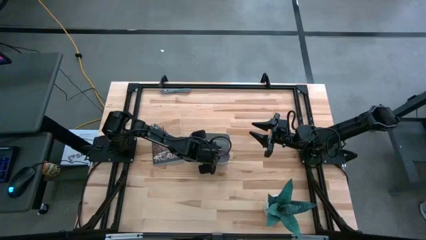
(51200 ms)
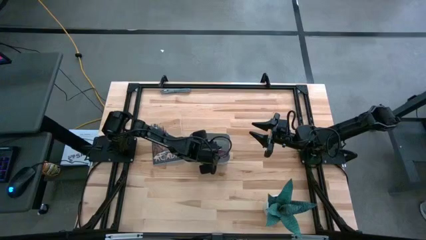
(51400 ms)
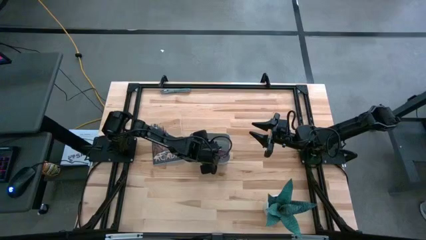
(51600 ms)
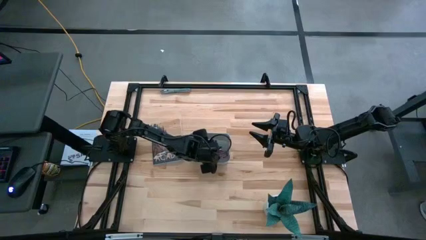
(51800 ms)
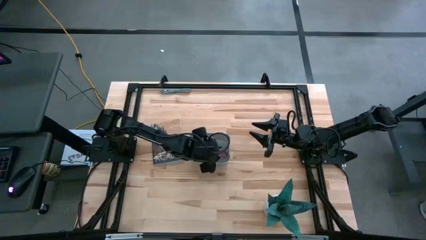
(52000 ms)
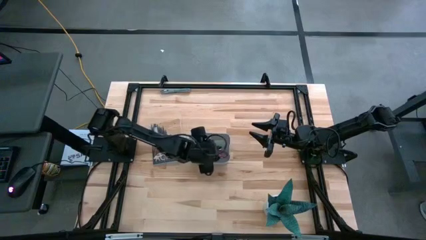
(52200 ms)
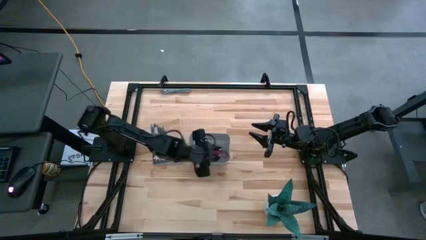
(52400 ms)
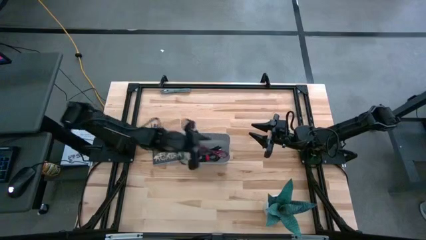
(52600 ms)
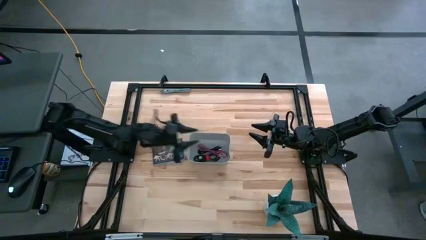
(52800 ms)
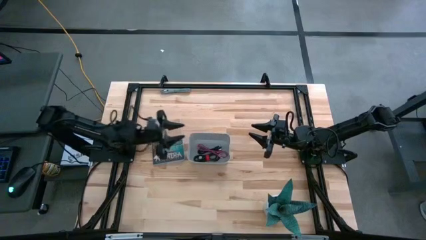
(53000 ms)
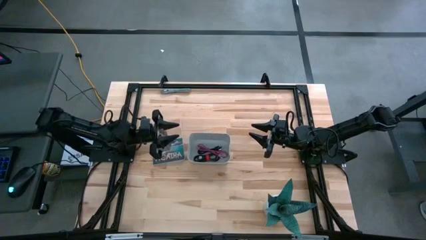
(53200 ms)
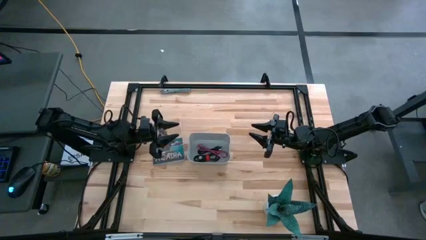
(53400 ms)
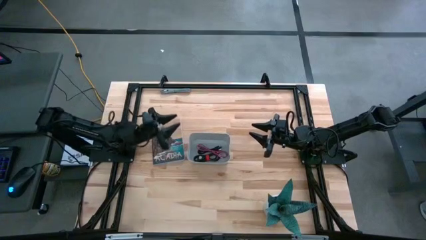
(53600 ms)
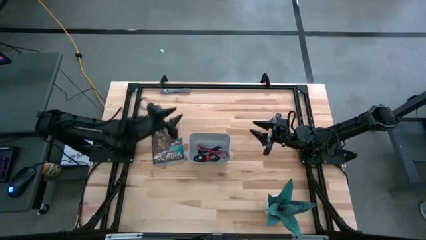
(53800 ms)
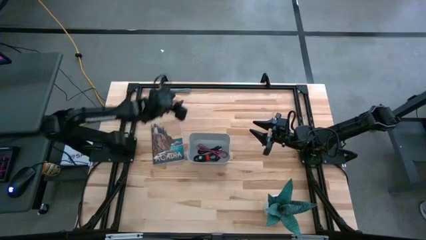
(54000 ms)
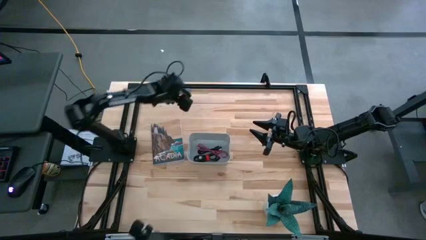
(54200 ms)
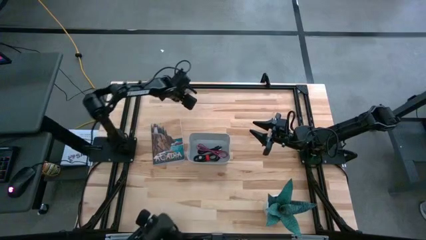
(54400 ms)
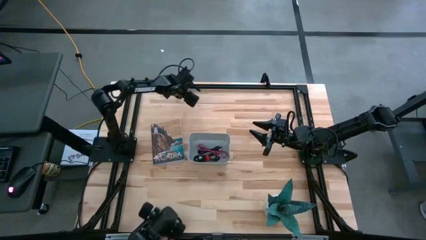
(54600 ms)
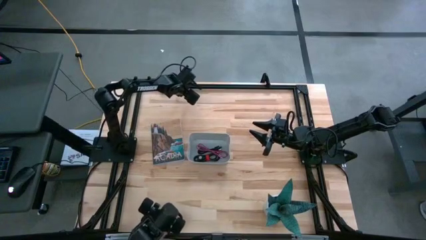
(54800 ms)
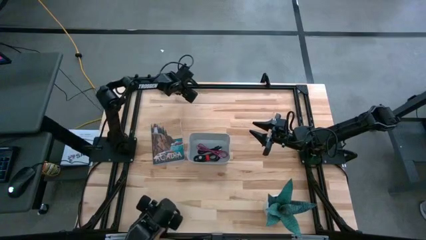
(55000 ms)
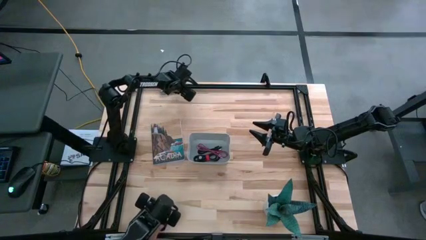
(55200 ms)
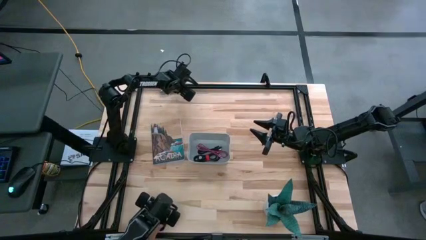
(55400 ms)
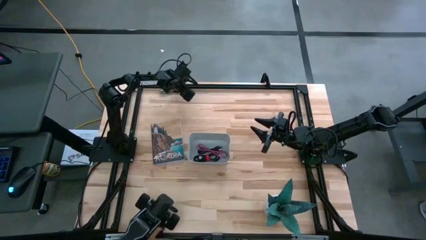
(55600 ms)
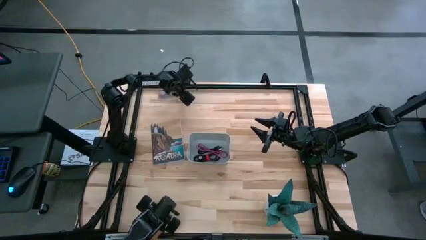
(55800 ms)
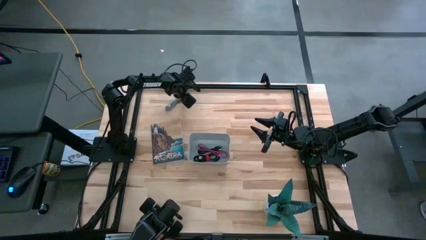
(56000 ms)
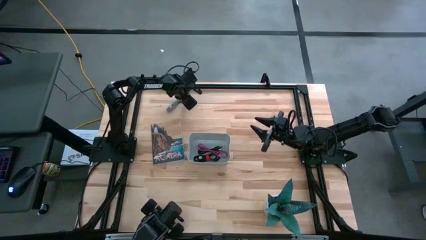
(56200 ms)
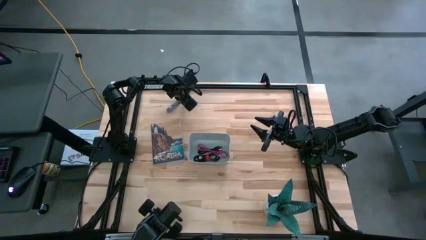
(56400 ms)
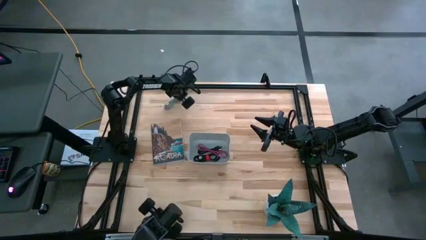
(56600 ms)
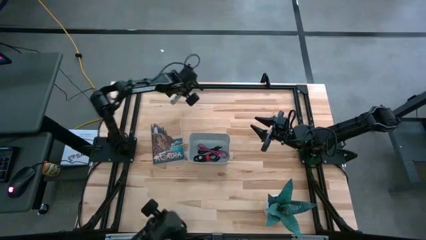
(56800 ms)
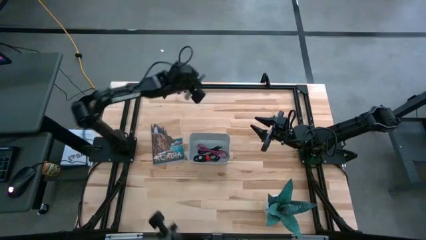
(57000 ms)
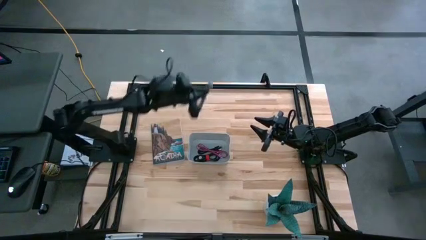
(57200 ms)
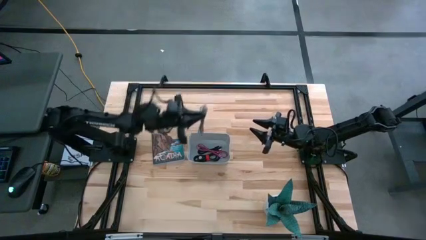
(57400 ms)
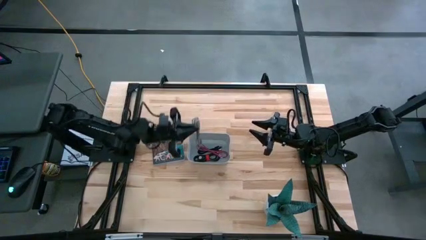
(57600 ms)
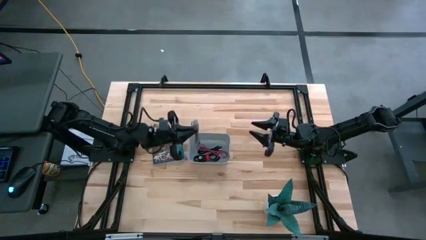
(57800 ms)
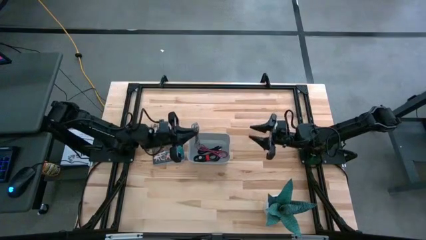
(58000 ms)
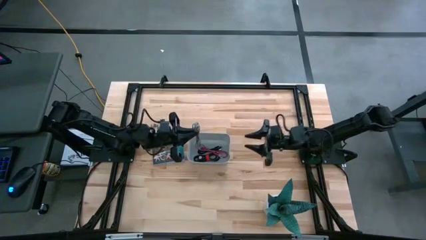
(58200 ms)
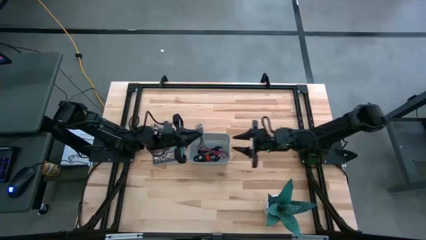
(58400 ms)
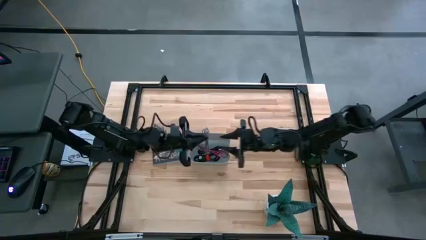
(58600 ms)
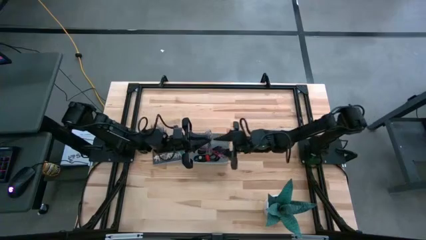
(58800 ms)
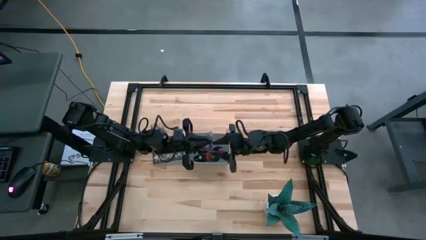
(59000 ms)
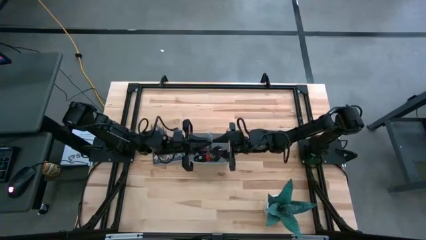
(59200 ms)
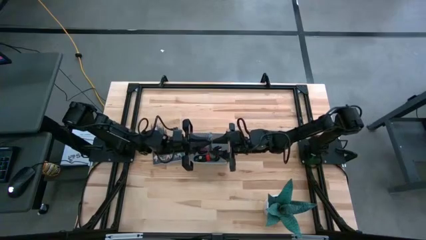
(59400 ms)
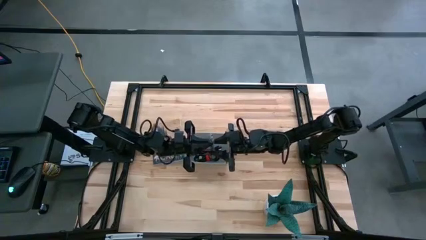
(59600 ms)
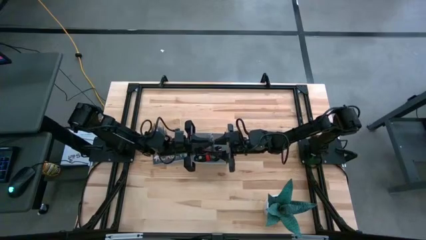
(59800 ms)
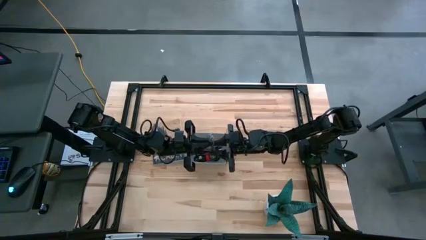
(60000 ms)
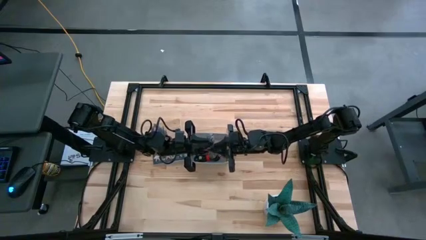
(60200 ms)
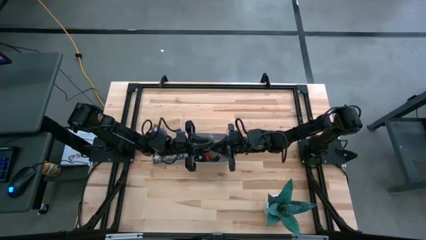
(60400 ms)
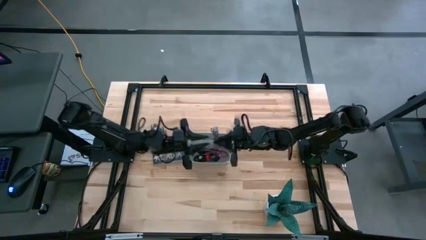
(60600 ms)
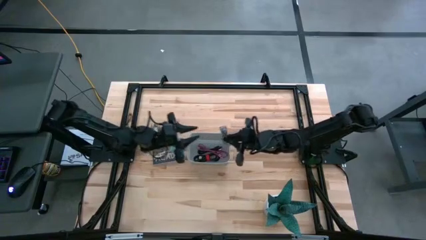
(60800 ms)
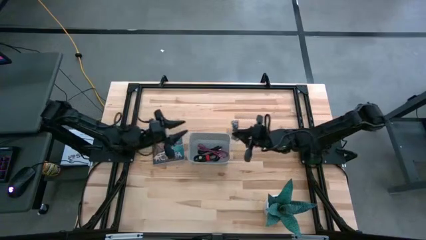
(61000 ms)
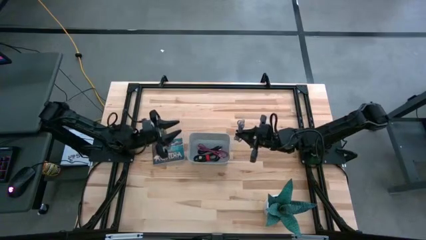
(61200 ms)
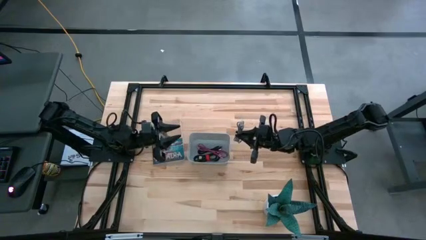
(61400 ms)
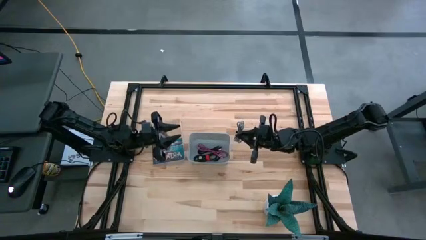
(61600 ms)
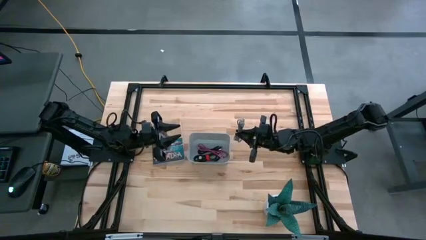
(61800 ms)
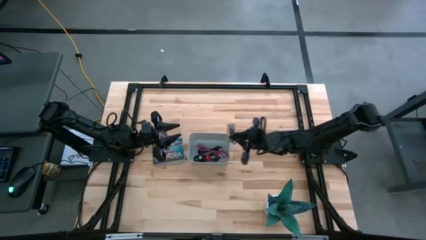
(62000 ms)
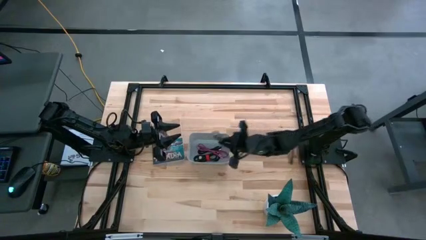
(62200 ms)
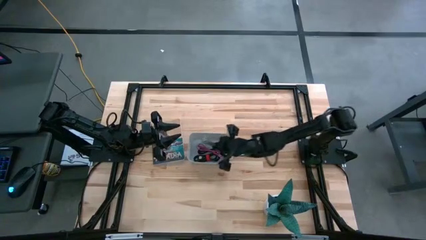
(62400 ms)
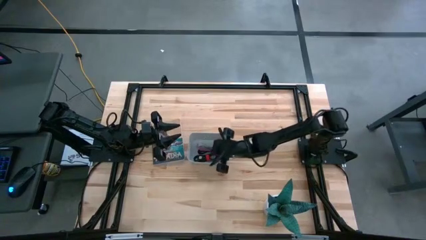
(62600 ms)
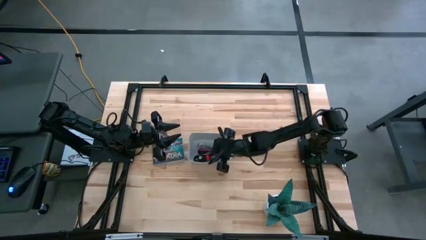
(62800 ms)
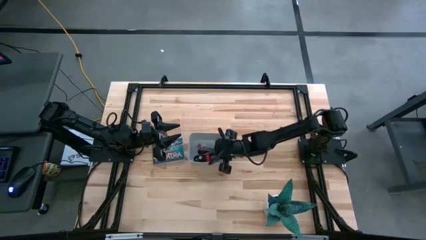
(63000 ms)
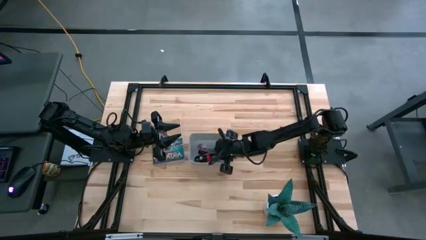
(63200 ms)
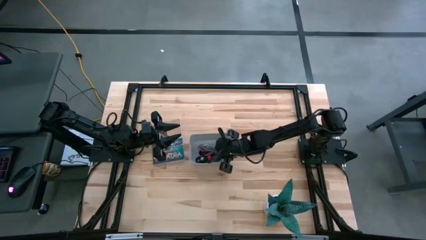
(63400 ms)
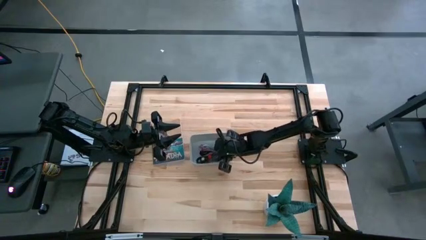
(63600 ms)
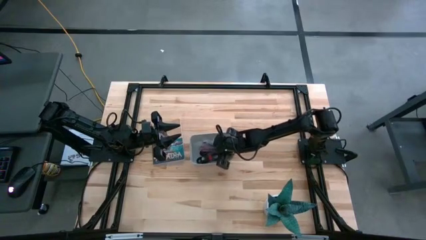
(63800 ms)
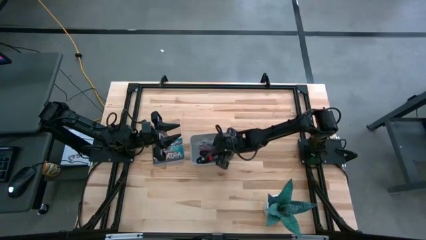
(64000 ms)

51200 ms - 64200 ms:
Task: Pick and place USB-C Cables
Put the black white charger cable into the gray bin

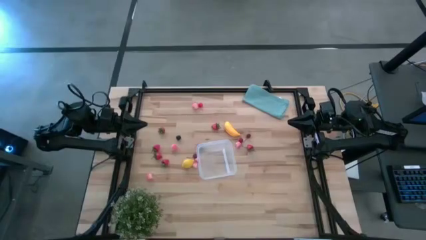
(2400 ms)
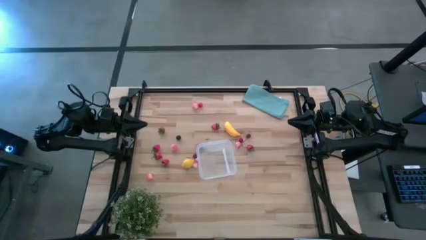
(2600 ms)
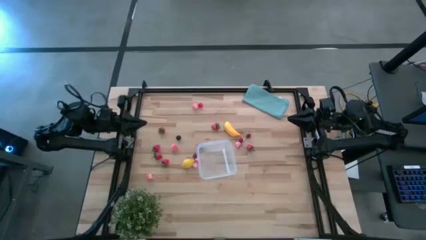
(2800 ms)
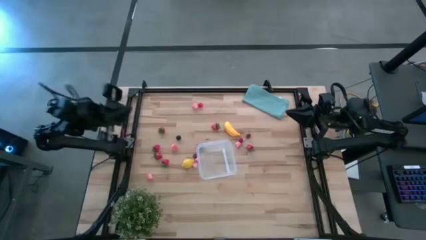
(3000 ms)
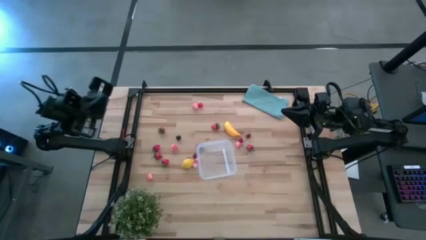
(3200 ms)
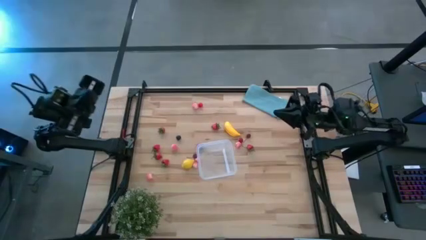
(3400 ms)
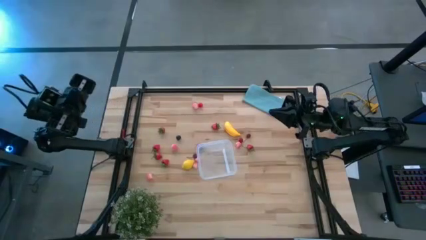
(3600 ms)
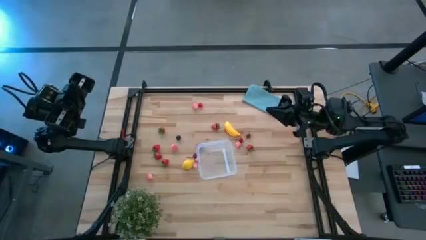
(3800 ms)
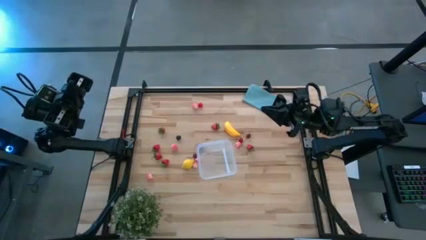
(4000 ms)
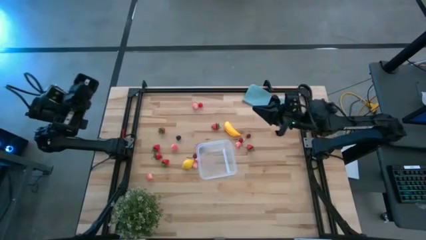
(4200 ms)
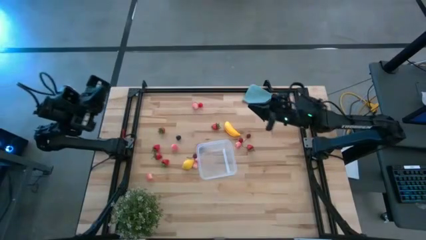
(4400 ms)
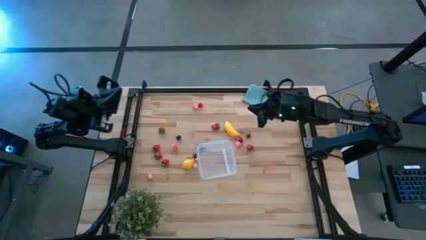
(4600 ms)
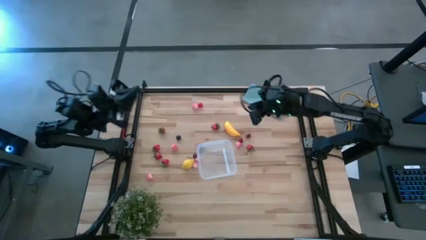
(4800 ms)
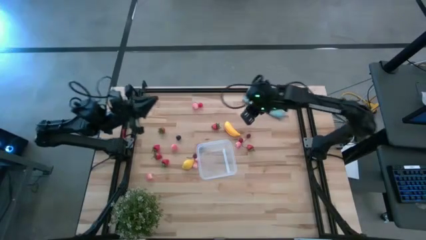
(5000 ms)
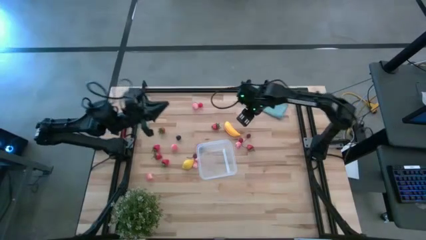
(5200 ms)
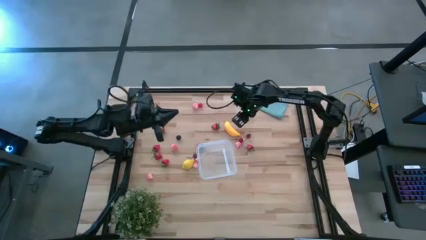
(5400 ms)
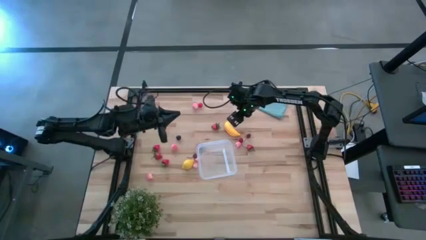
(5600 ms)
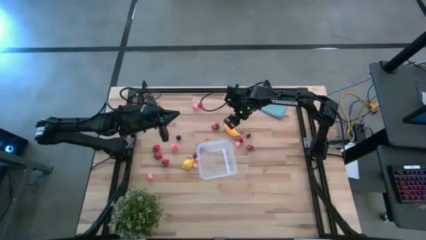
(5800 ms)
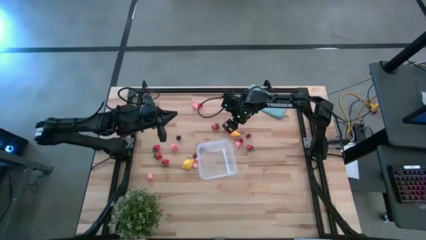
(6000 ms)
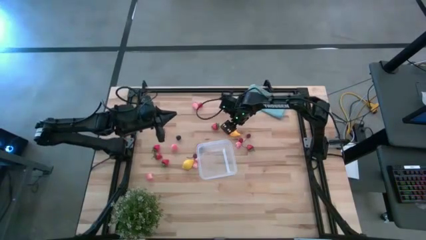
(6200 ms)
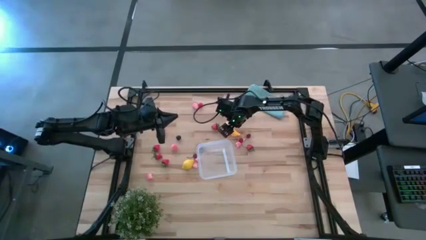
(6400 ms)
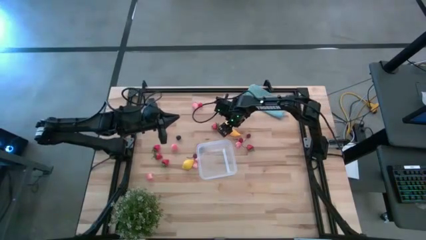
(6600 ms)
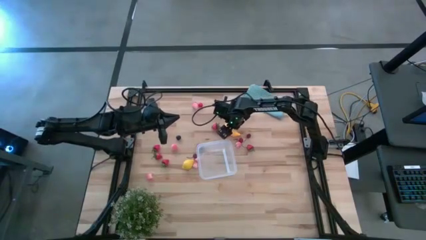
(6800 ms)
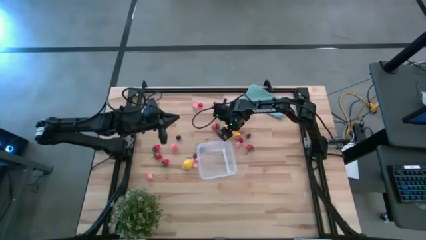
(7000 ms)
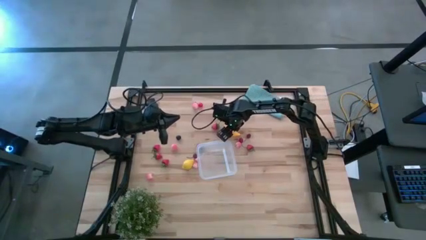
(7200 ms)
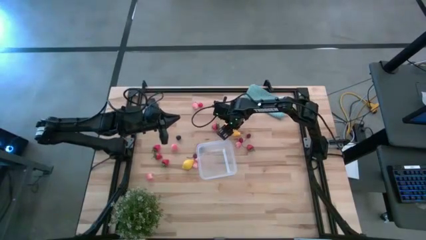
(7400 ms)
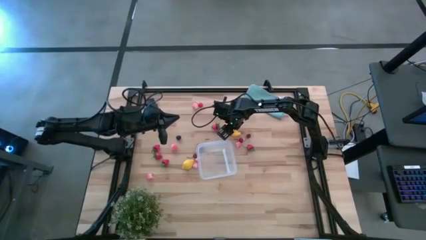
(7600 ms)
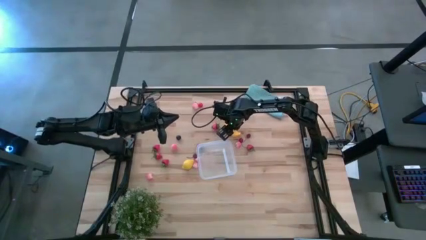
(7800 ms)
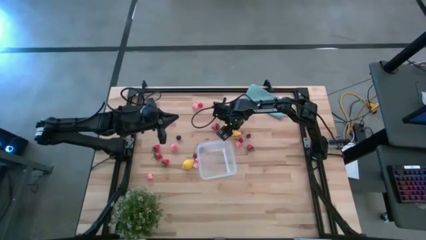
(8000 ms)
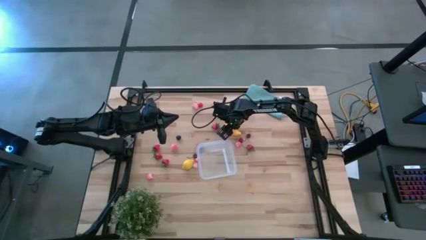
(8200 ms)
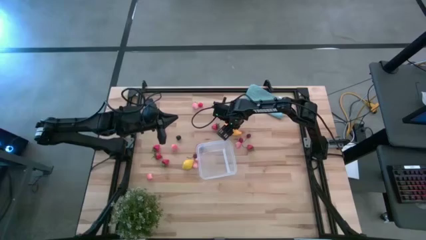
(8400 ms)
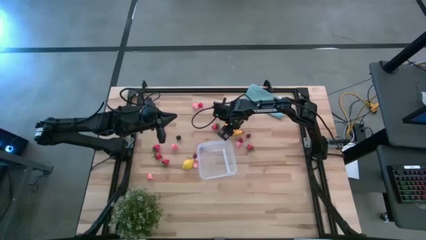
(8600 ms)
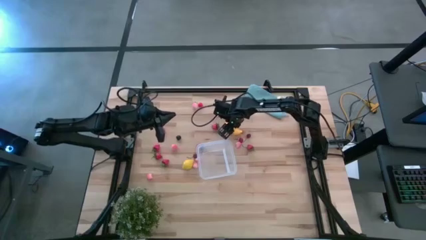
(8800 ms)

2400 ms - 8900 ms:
Task: Pick and placing Produce into tupperware
Put the yellow banana into the transparent bin
